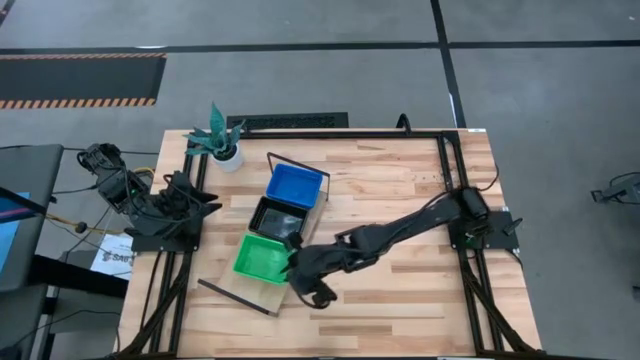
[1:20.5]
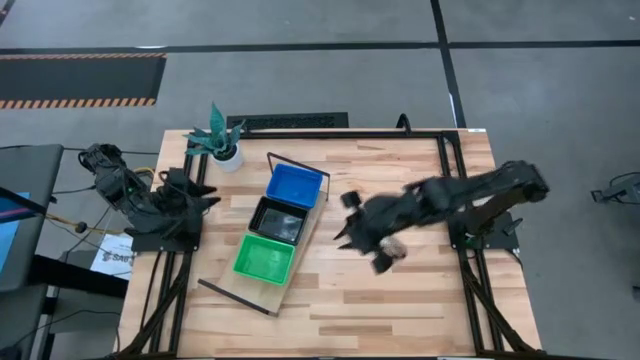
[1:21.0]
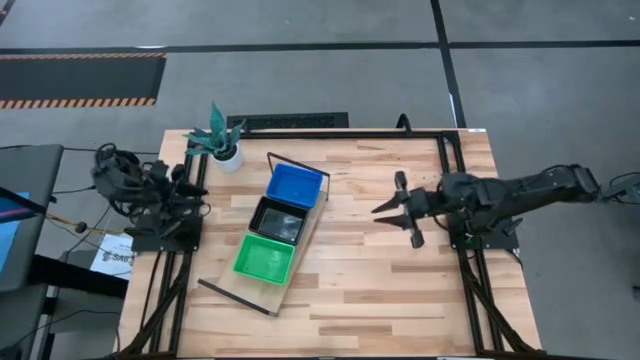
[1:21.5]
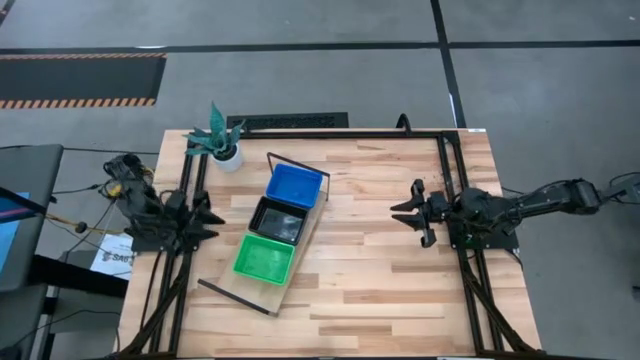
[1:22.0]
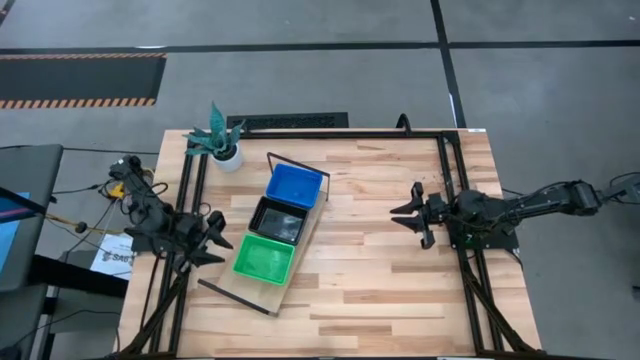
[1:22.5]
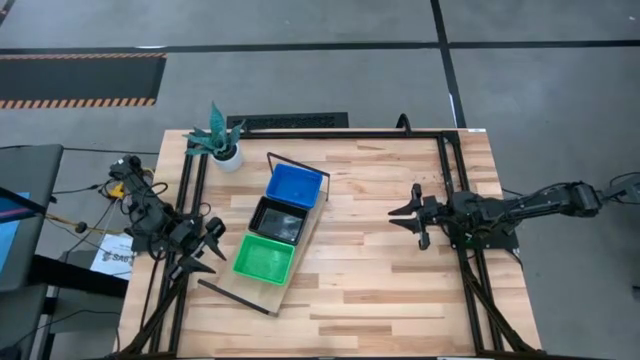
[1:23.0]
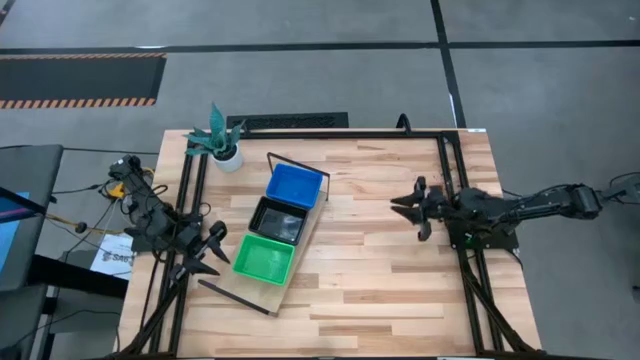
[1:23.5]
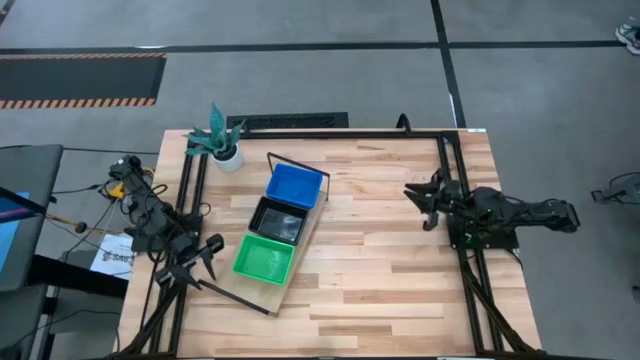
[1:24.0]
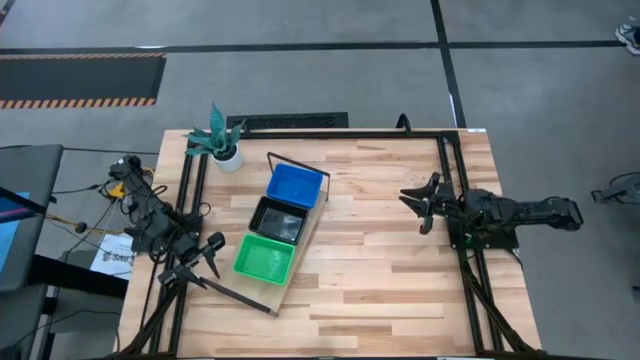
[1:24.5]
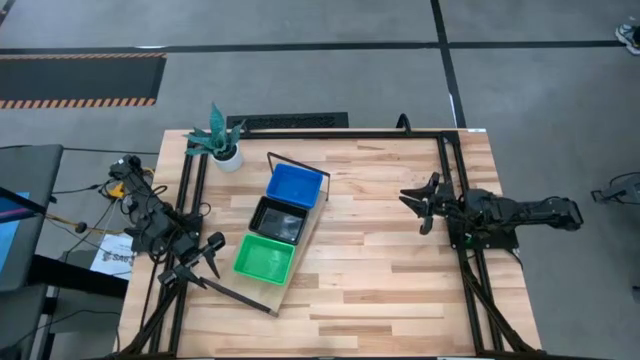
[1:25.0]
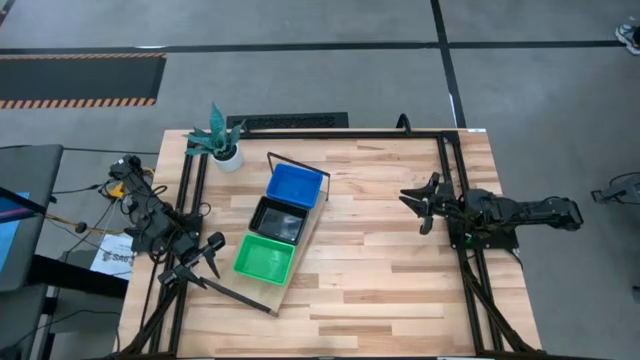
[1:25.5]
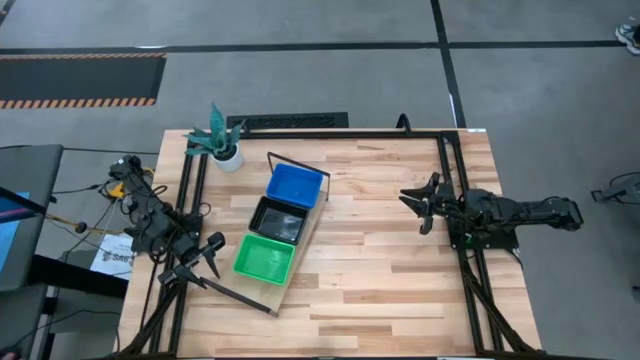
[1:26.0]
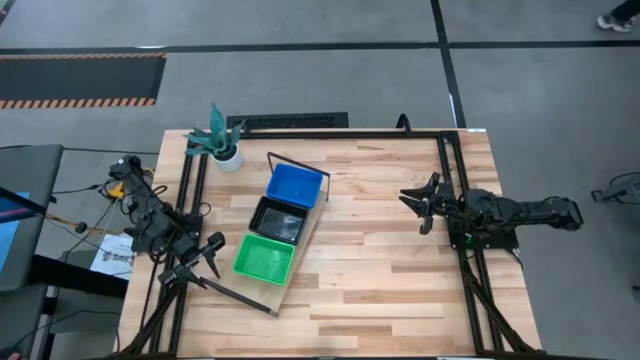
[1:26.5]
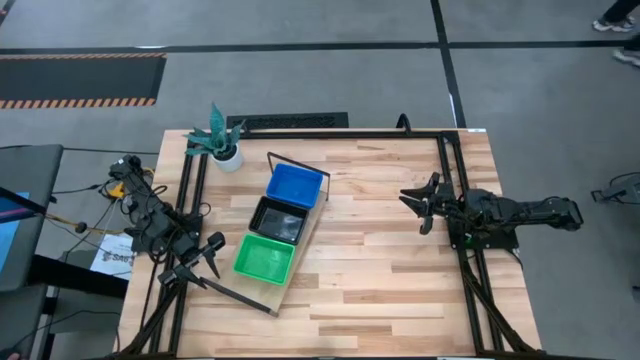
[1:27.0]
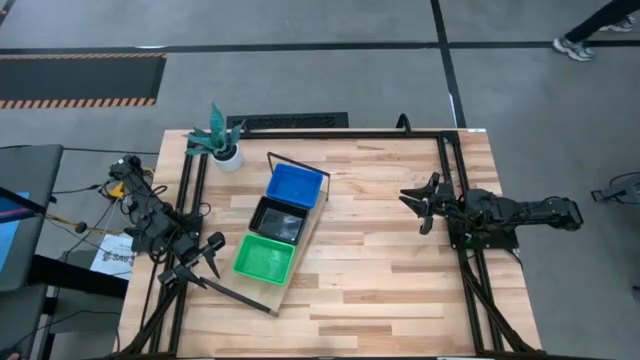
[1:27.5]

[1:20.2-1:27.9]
Task: Stack baskets on shelf by color
Return to Home Position

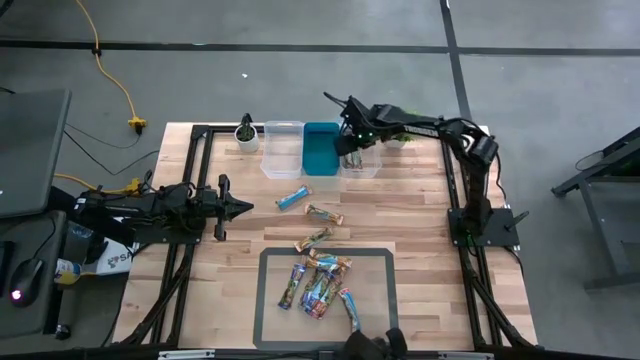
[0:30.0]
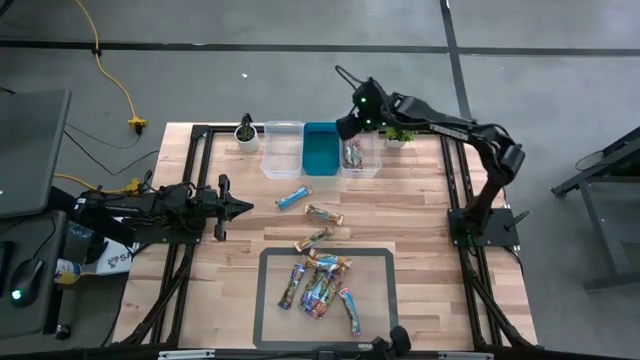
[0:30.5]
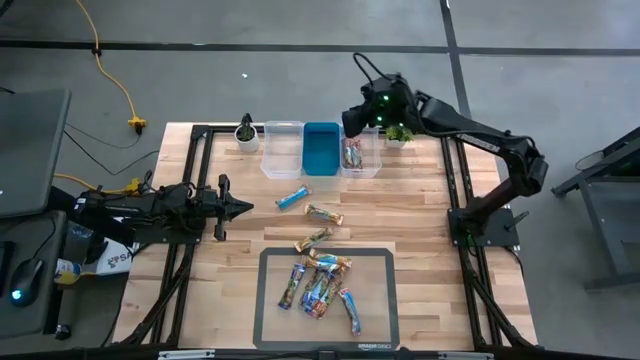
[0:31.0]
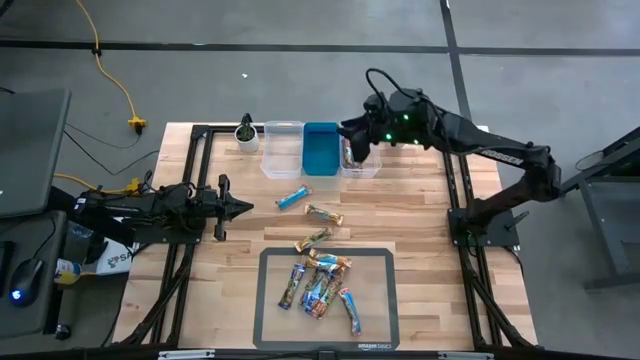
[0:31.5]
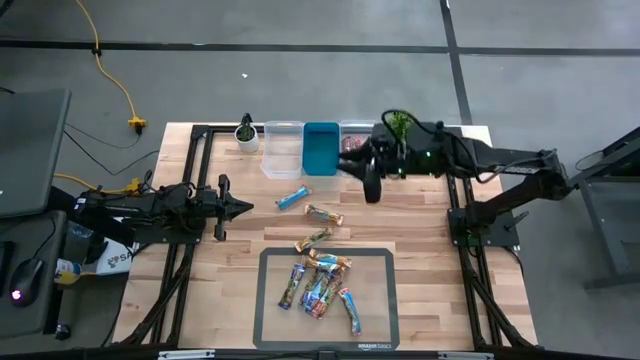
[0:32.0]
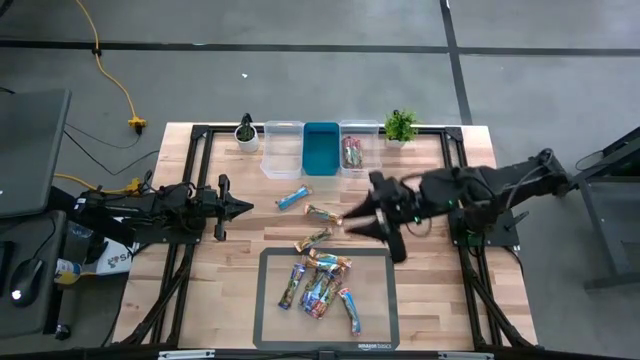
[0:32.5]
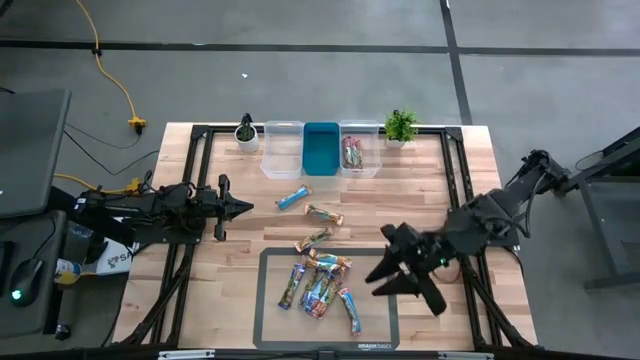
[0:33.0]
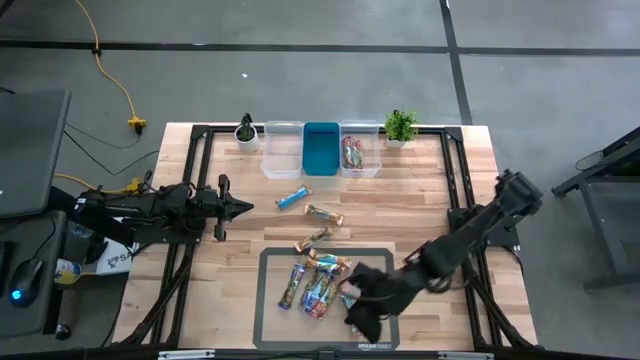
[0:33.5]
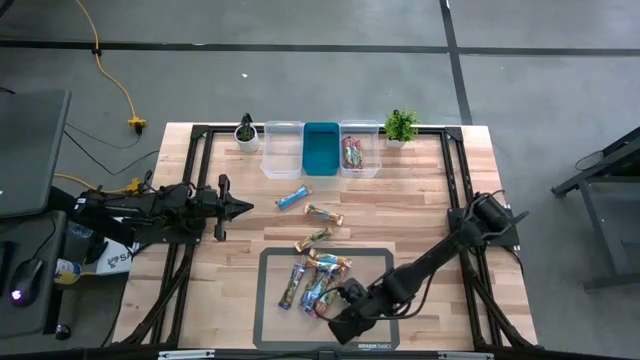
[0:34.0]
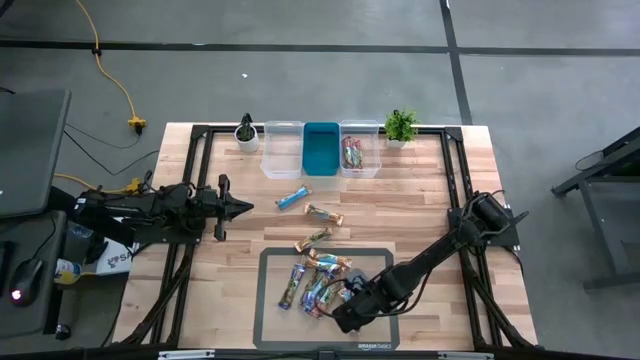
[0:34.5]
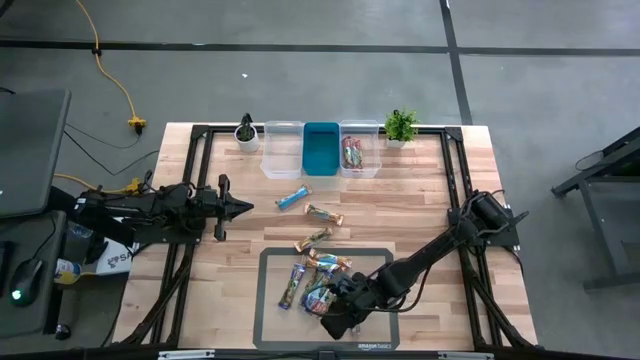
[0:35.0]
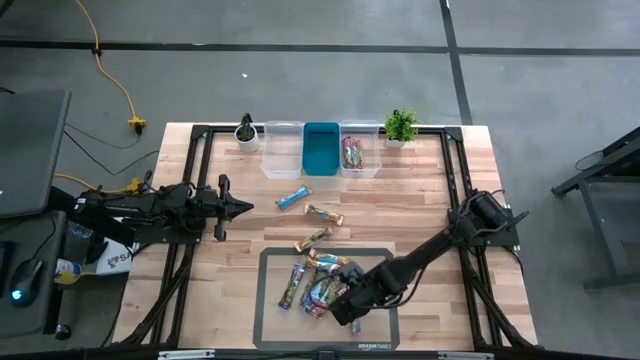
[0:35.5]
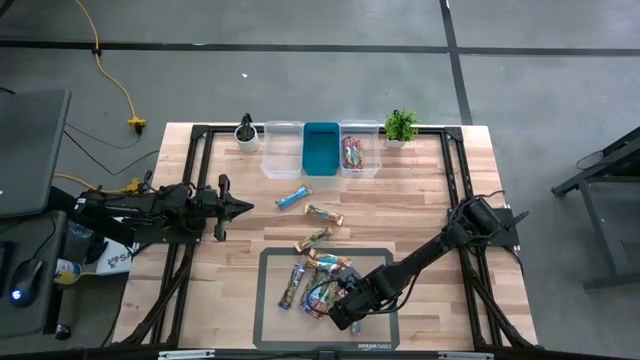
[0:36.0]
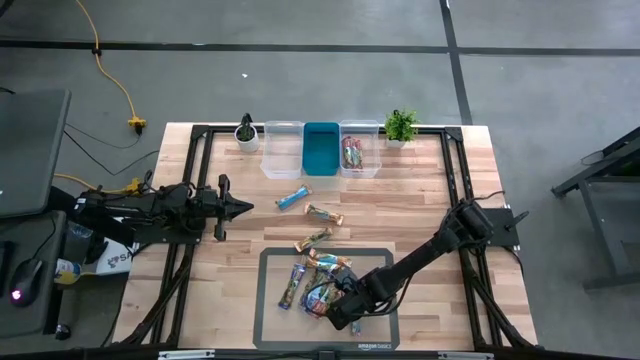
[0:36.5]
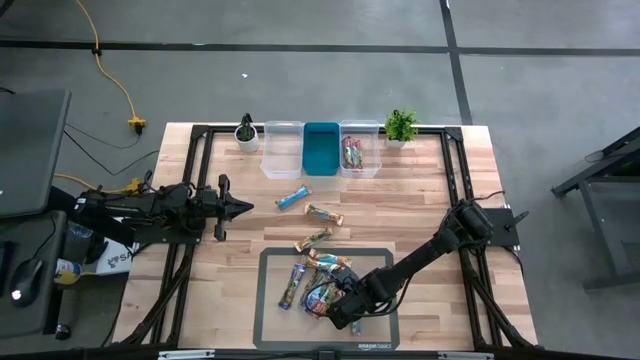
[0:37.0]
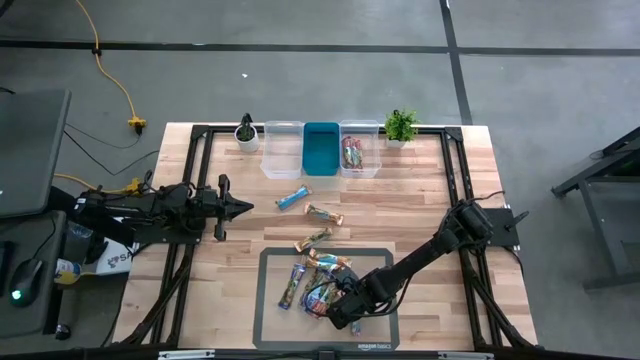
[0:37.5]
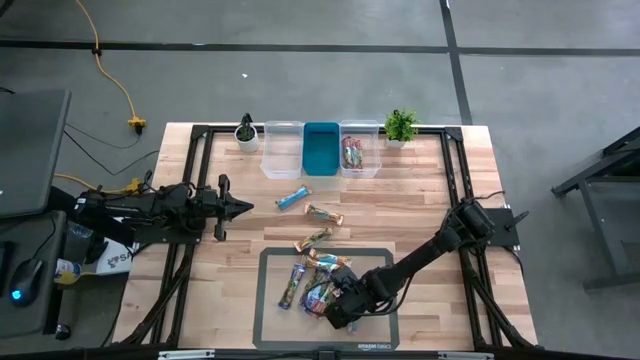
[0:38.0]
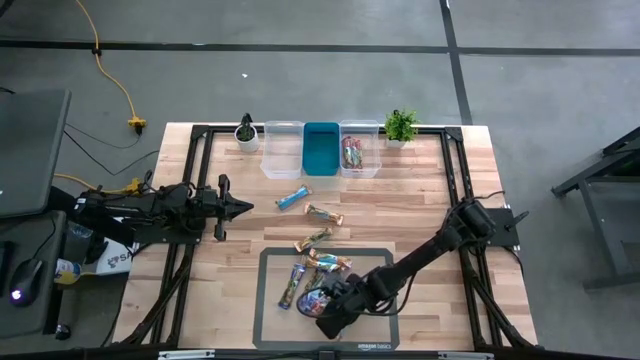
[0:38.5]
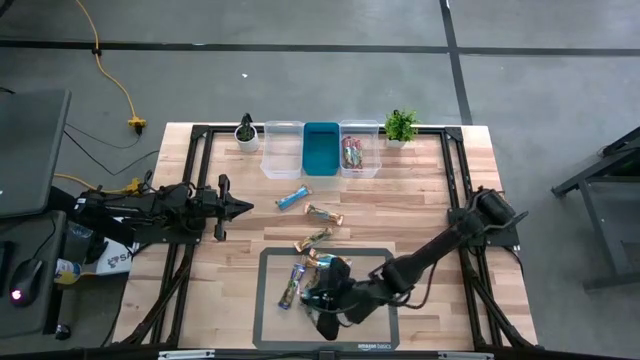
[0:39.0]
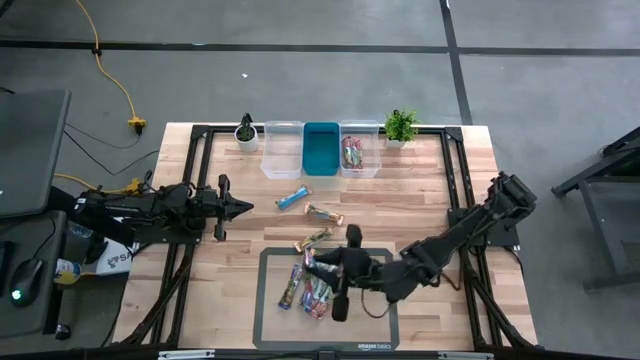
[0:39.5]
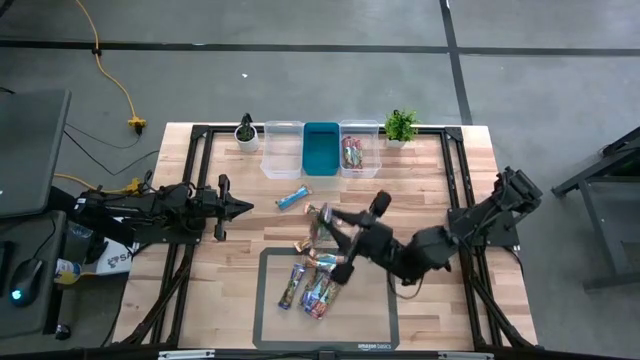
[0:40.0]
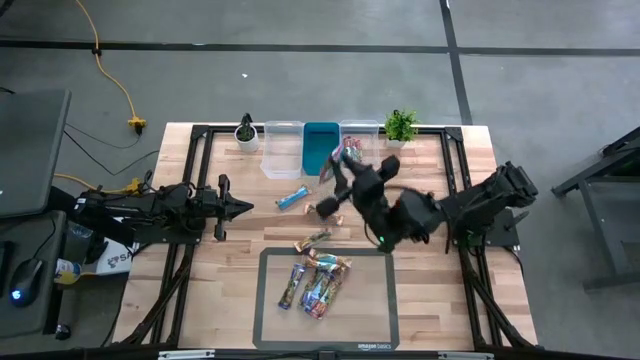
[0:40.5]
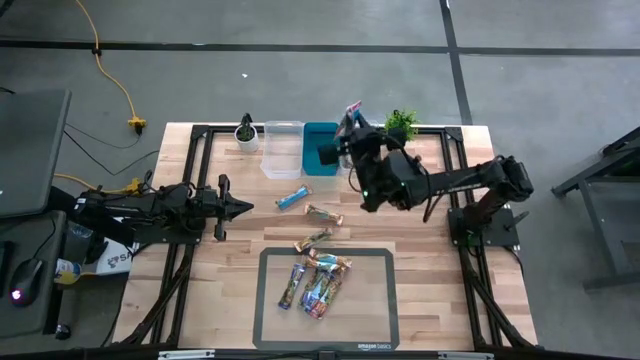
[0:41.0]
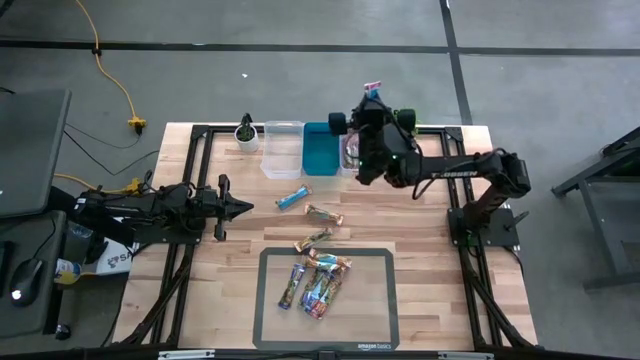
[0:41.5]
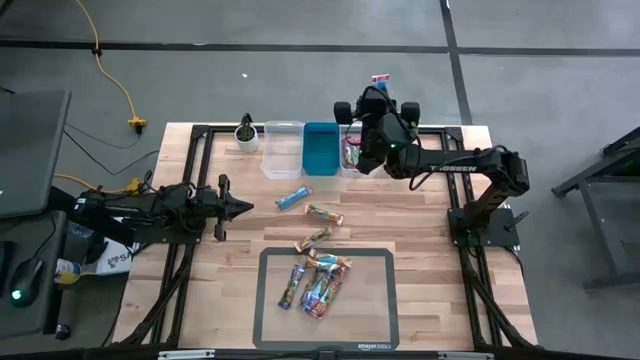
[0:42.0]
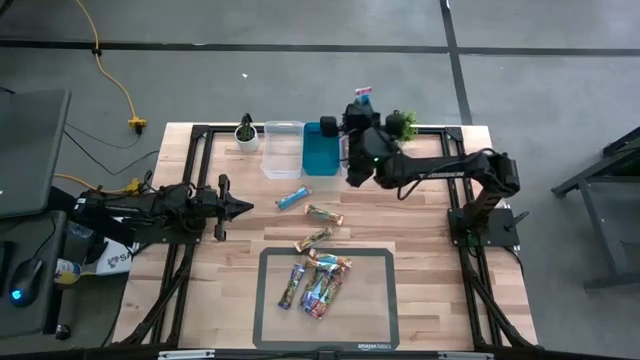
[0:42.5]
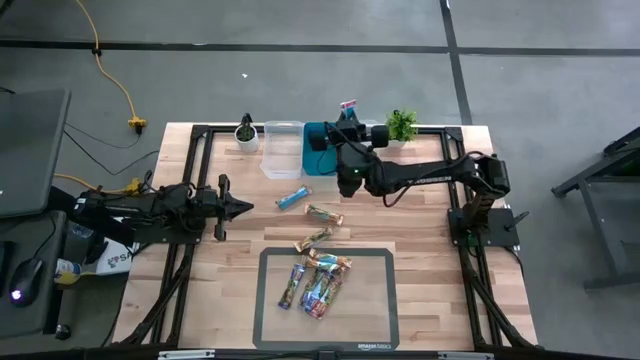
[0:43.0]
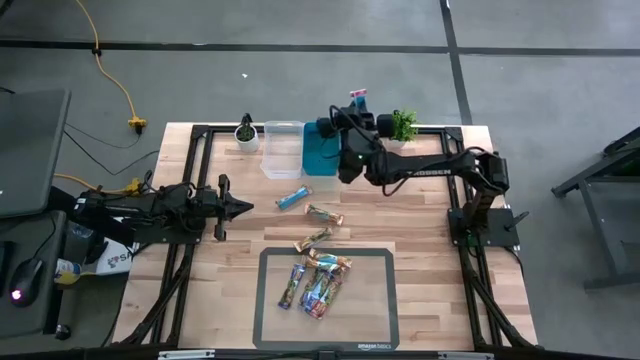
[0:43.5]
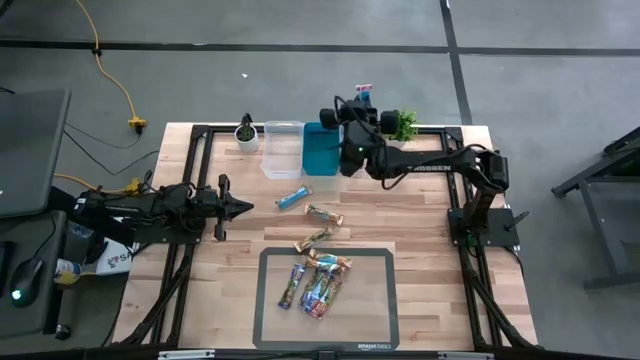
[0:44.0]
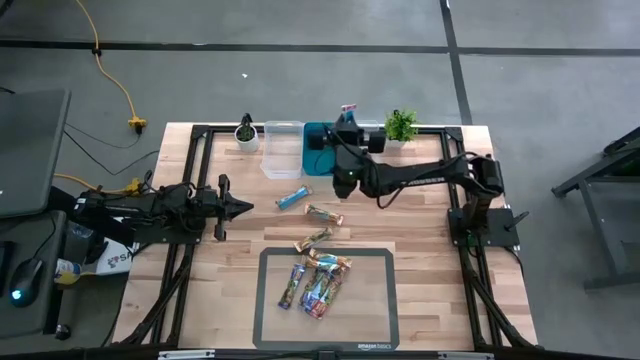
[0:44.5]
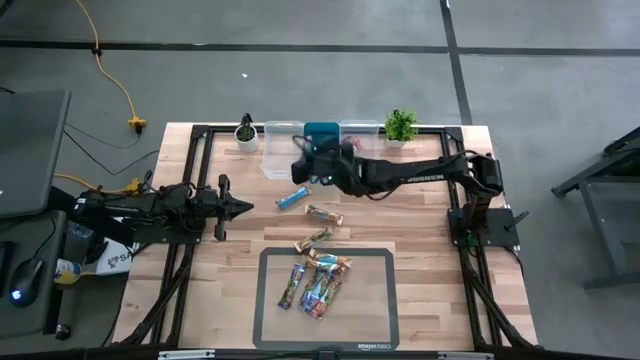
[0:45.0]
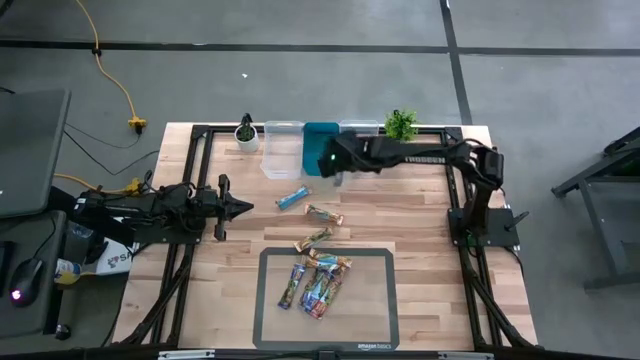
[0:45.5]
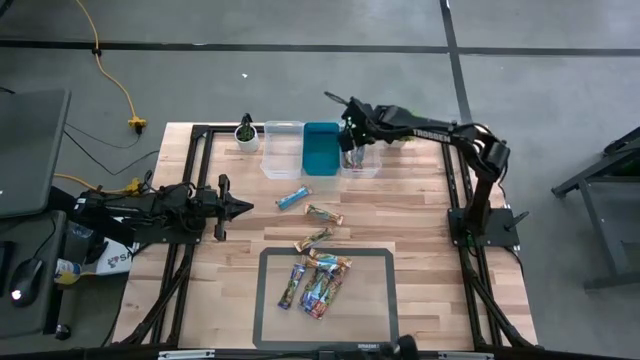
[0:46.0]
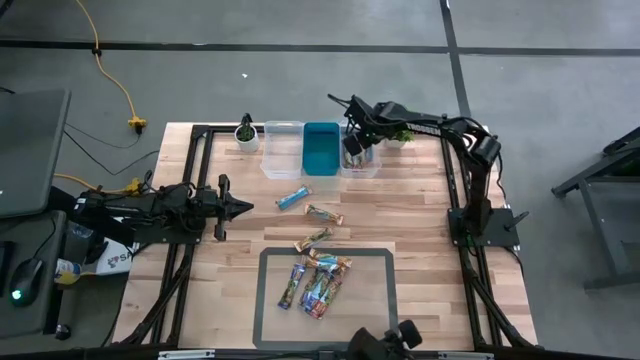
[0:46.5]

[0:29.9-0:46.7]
Task: Pick and place Granola Bars by type
Put the red granola bar into the right transparent bin
